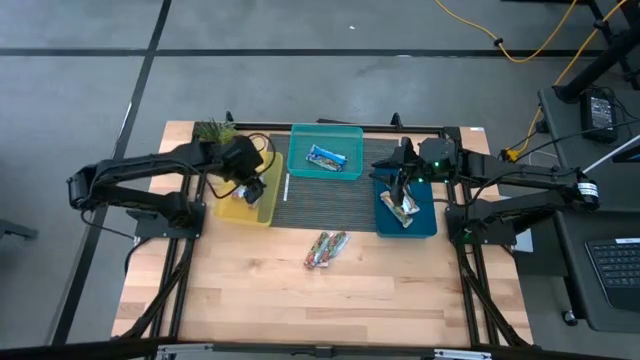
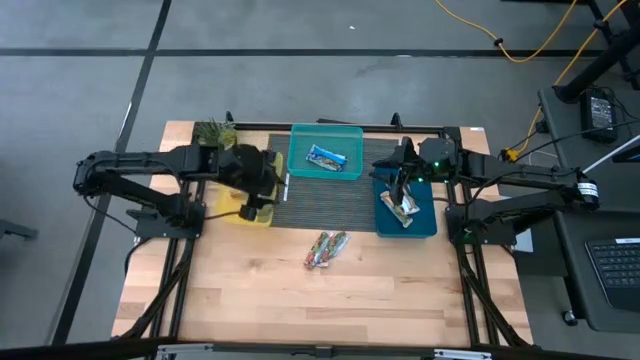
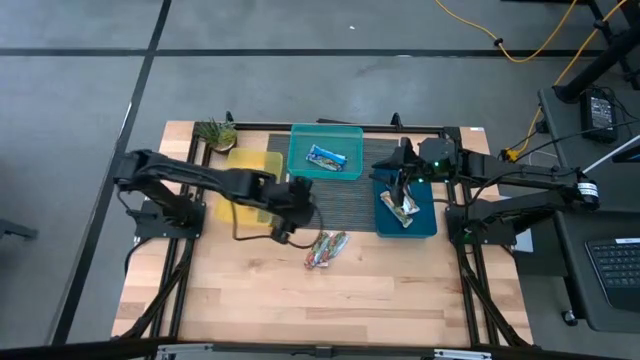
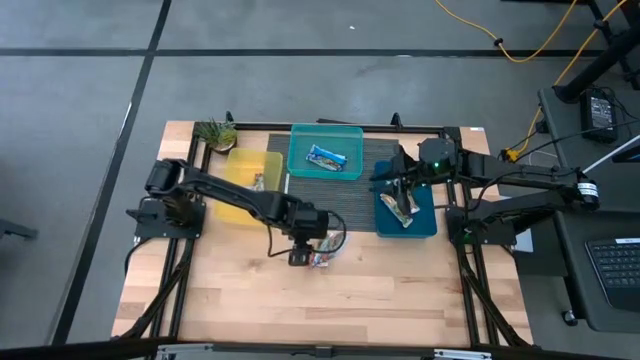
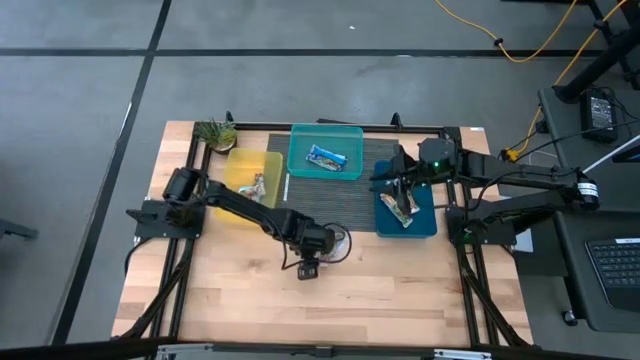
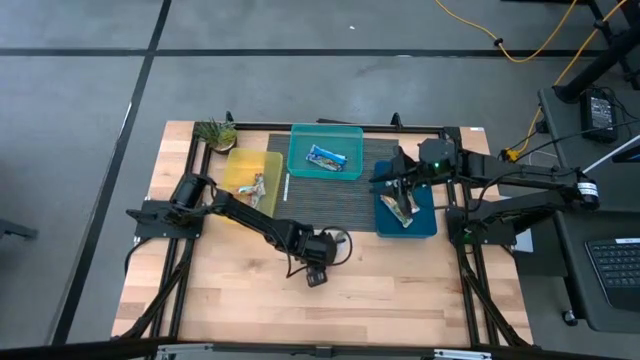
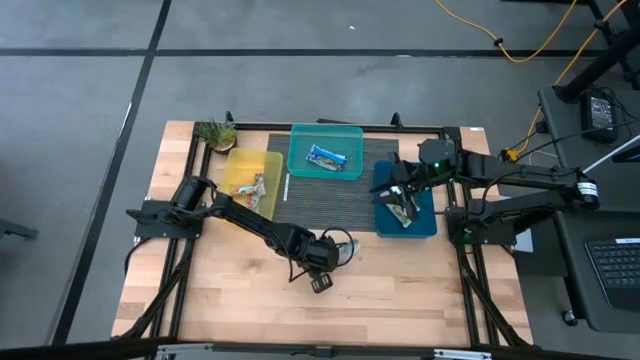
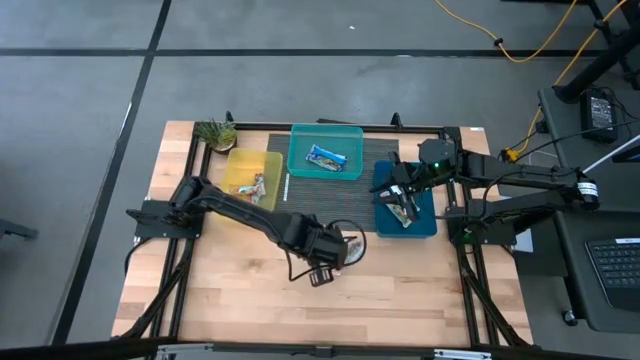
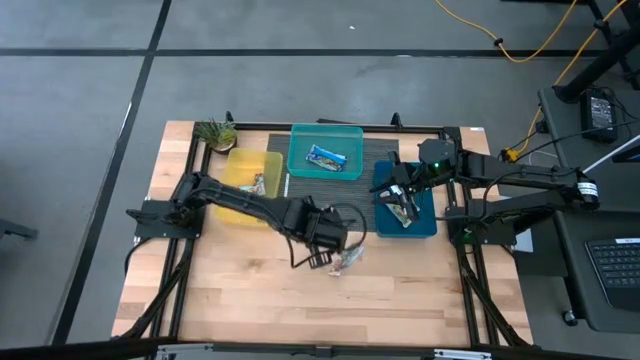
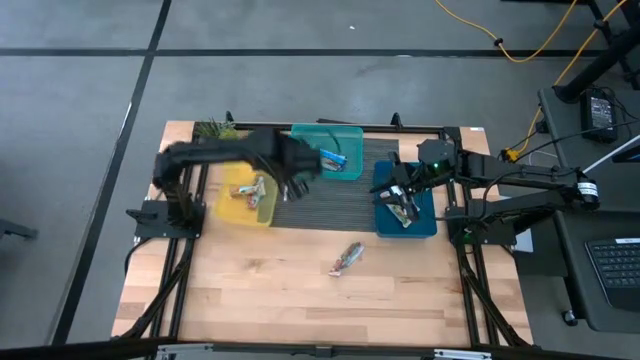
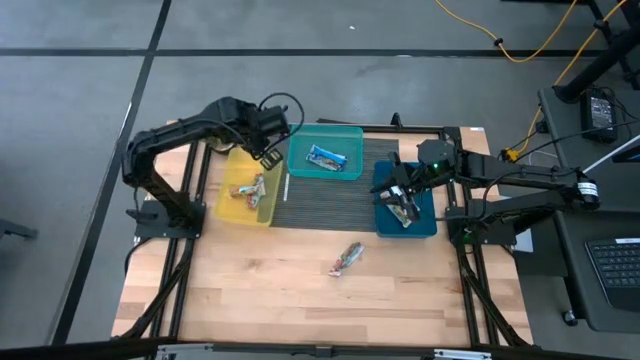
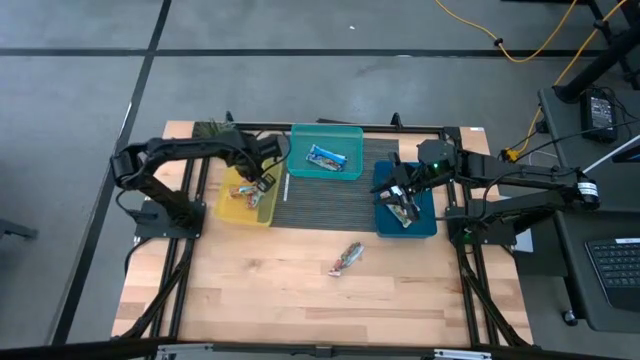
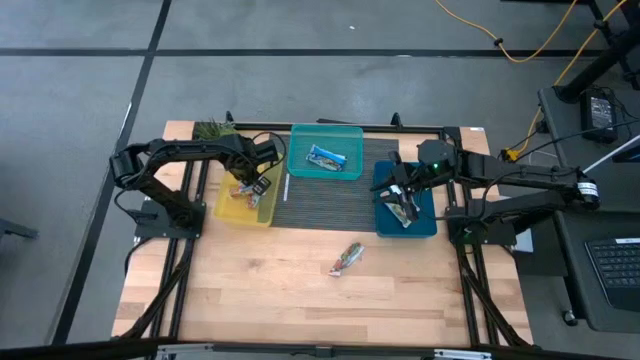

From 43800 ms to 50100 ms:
Task: Pick and place Granola Bars by type
Put the red granola bar into the yellow bin

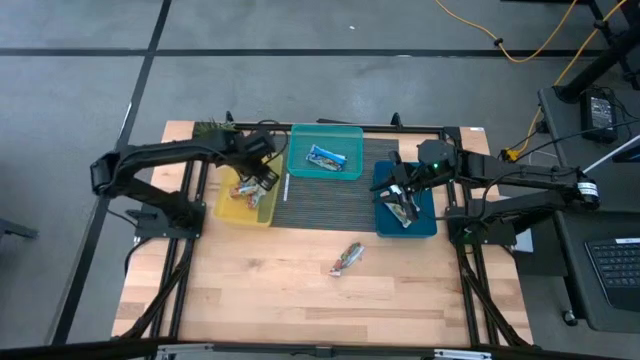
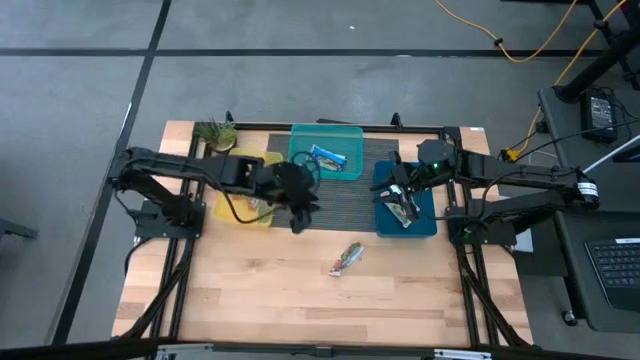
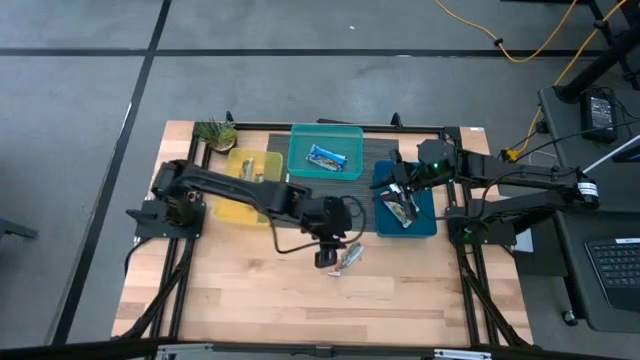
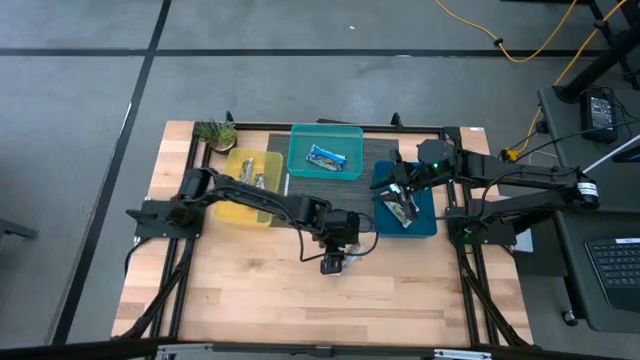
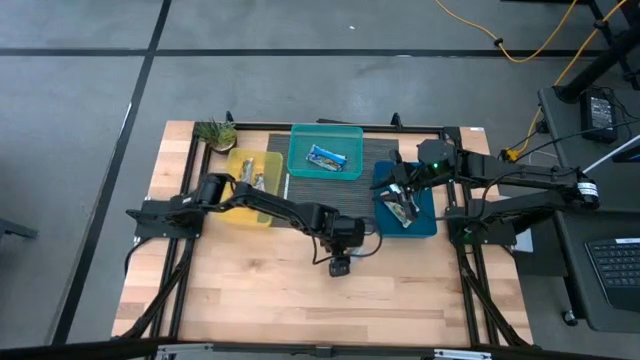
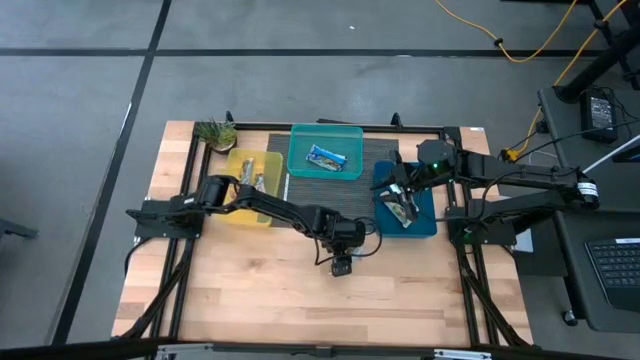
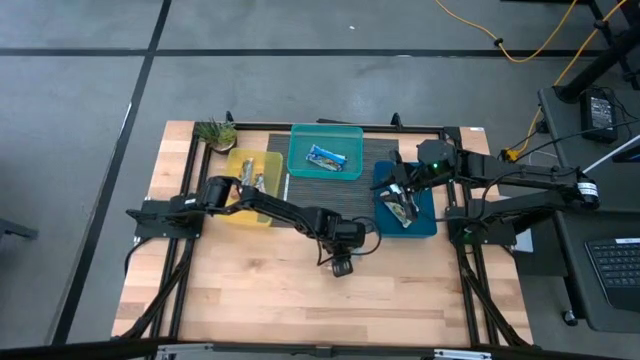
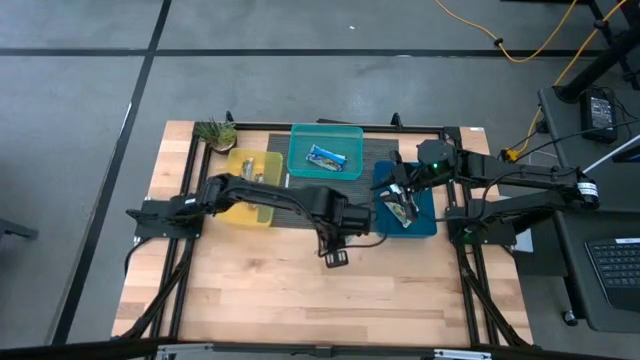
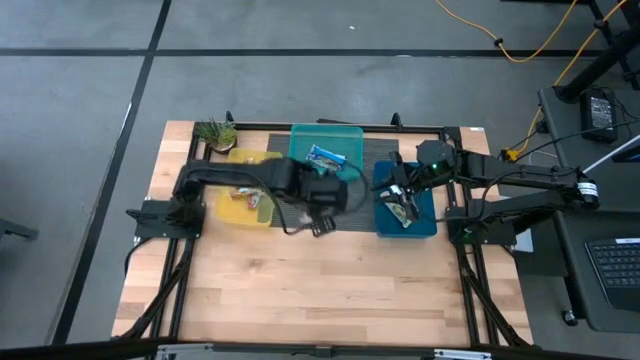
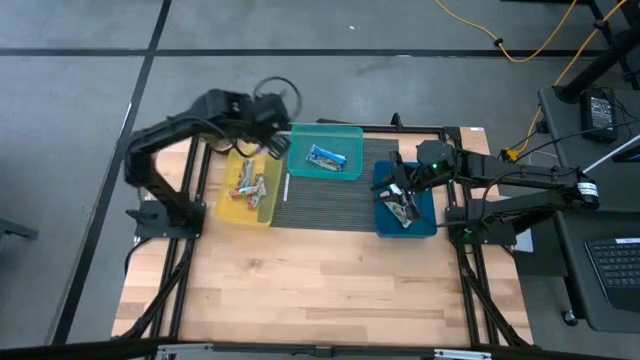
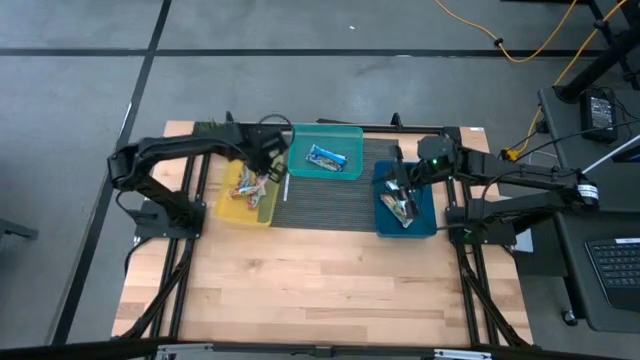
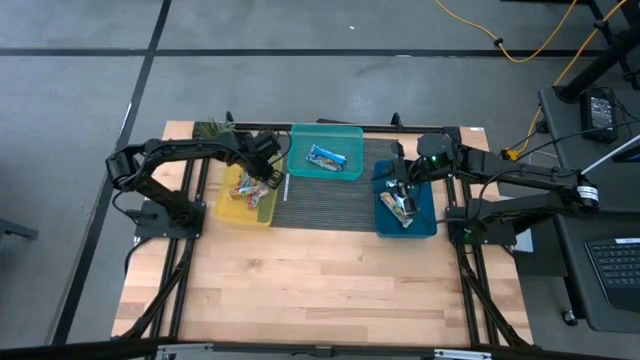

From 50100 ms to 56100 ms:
Put the red granola bar into the yellow bin

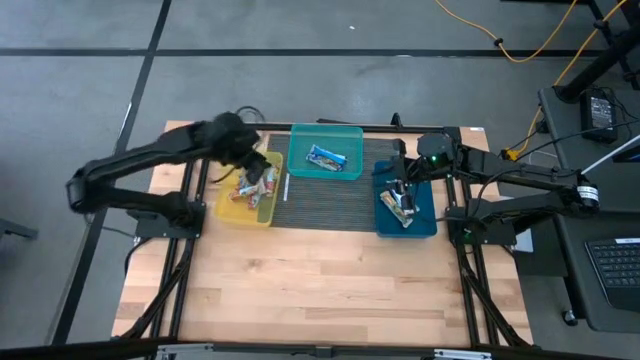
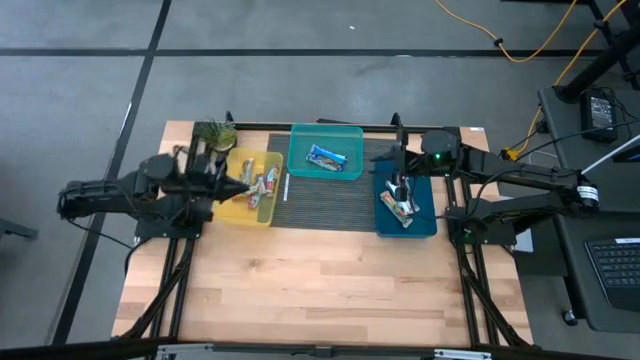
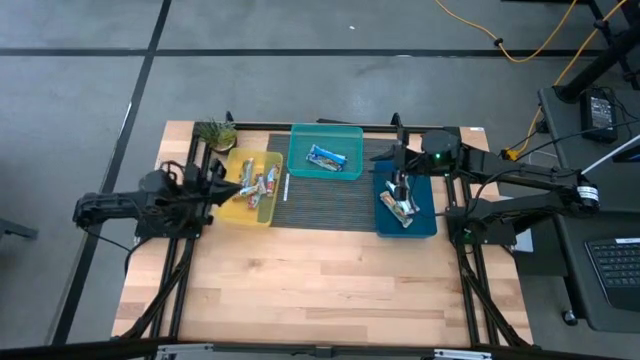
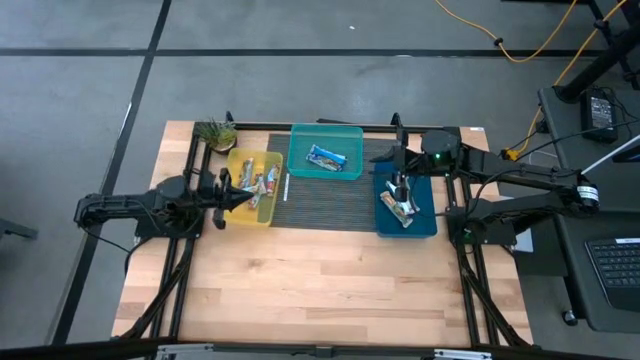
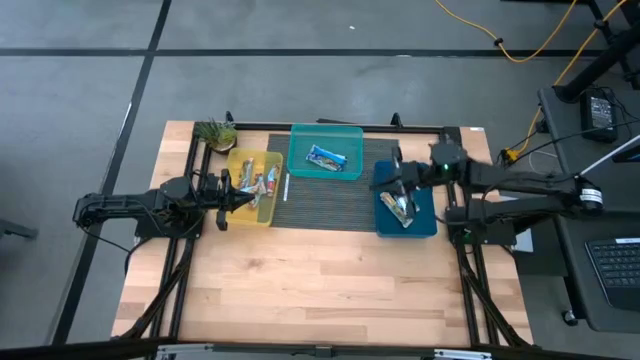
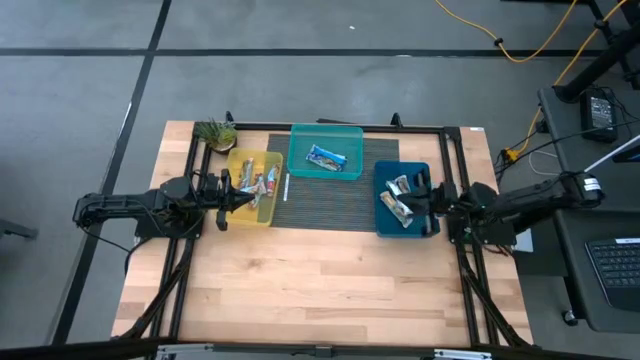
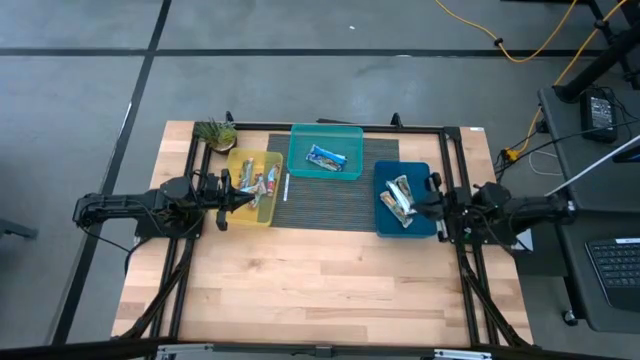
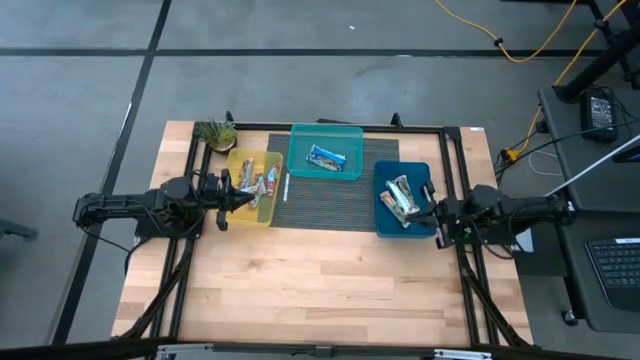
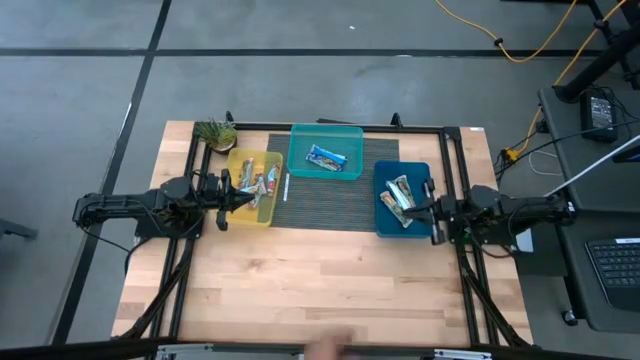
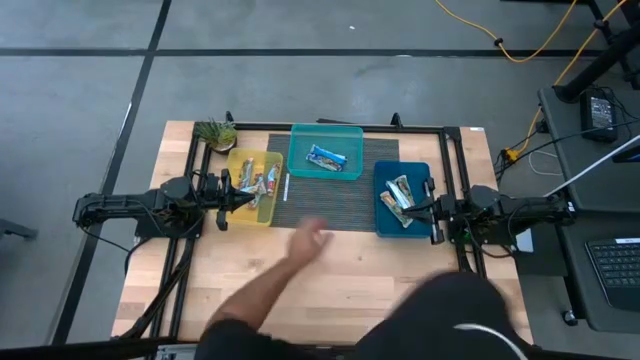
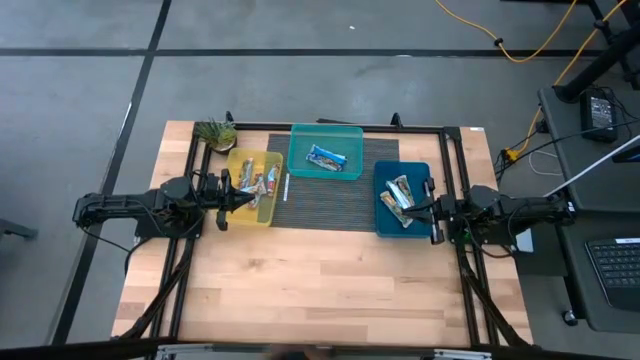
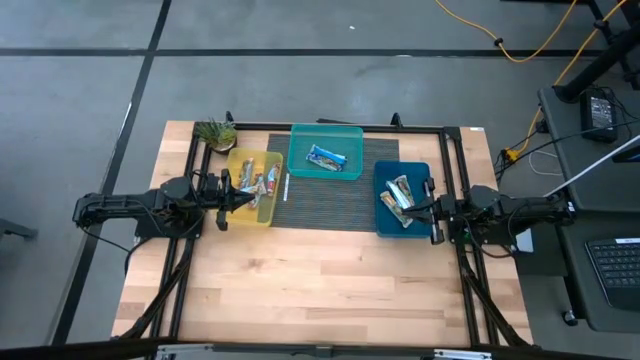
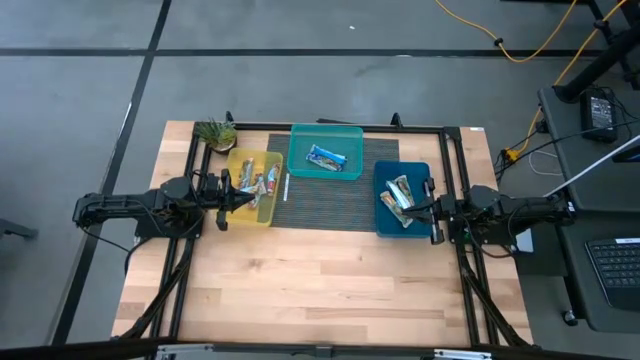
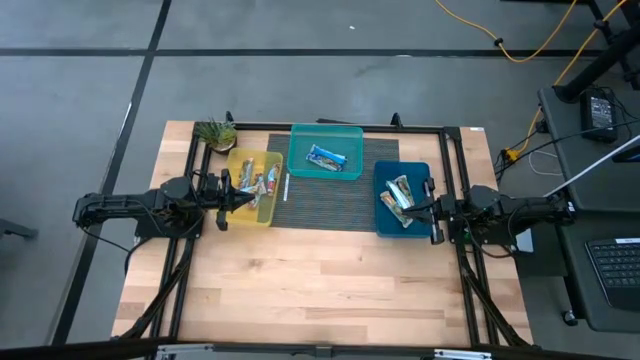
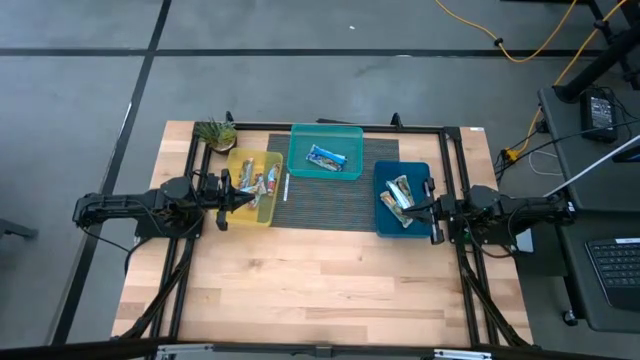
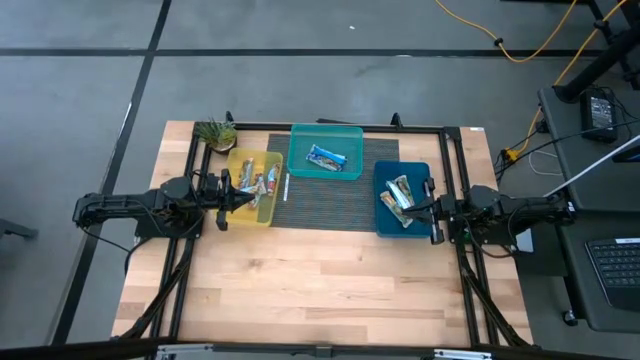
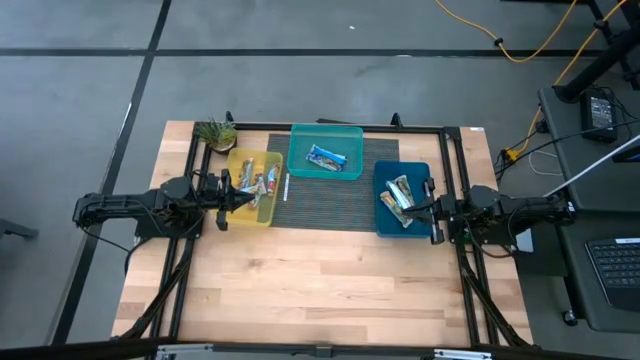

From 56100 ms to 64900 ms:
Return to Home Position
